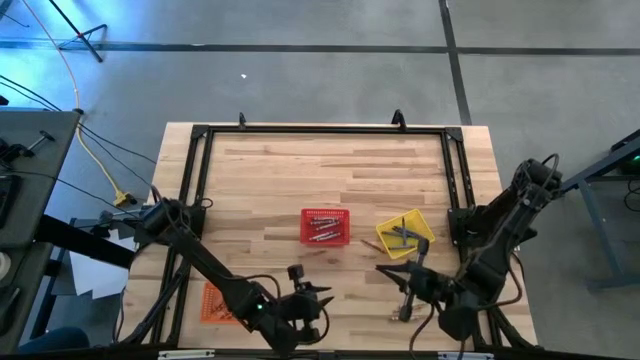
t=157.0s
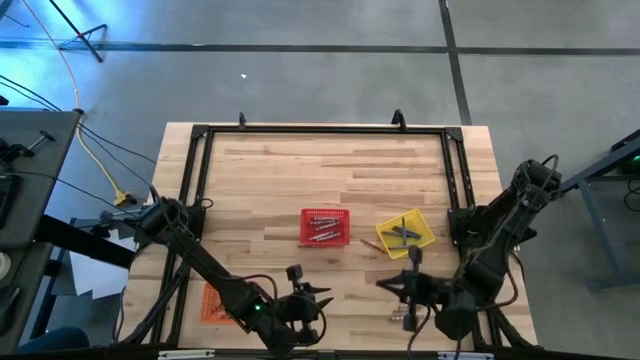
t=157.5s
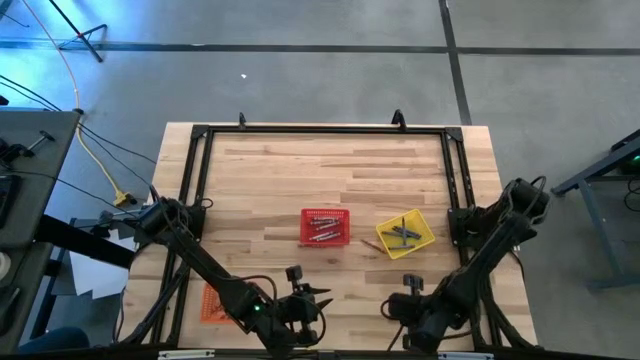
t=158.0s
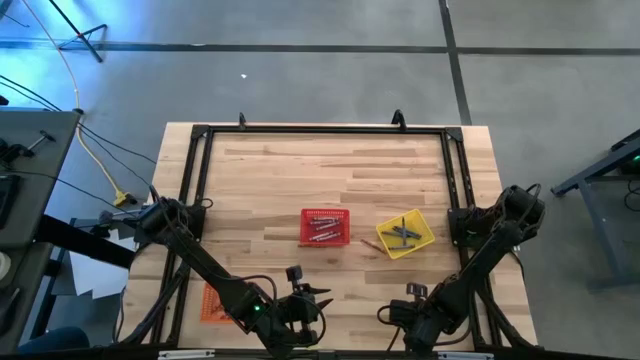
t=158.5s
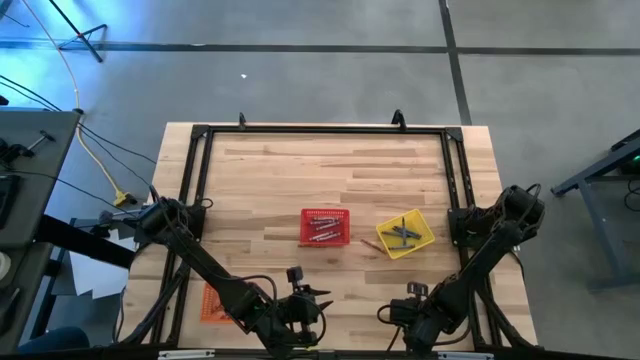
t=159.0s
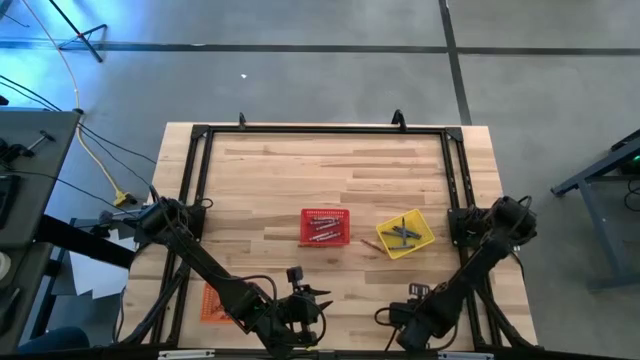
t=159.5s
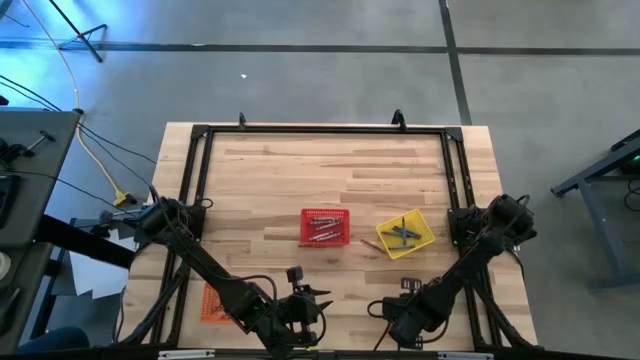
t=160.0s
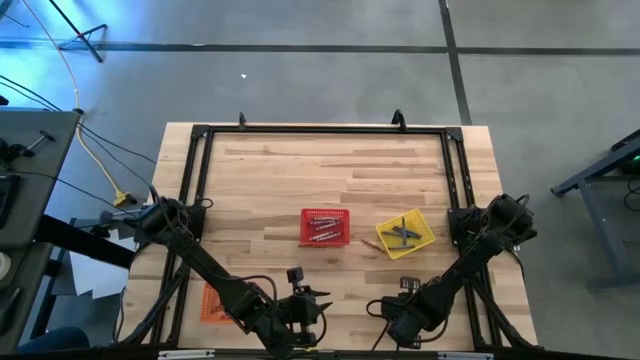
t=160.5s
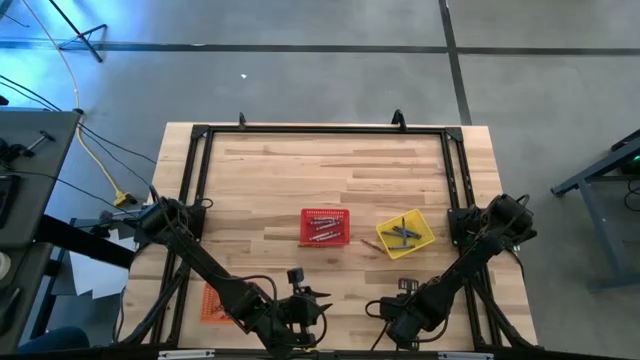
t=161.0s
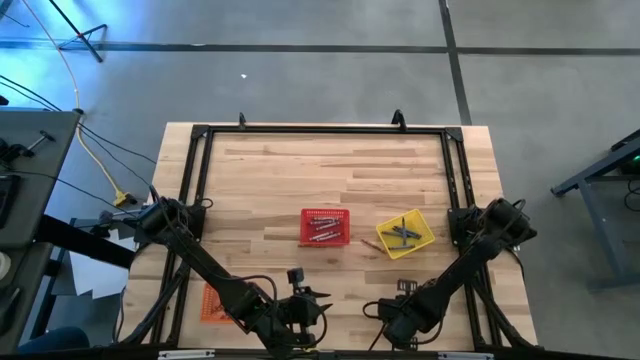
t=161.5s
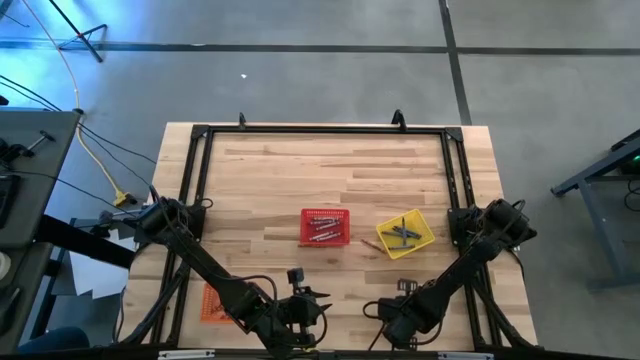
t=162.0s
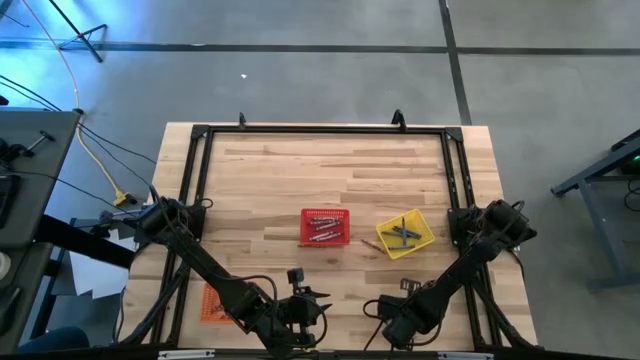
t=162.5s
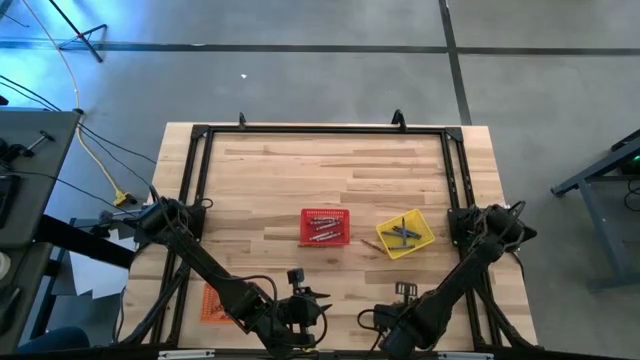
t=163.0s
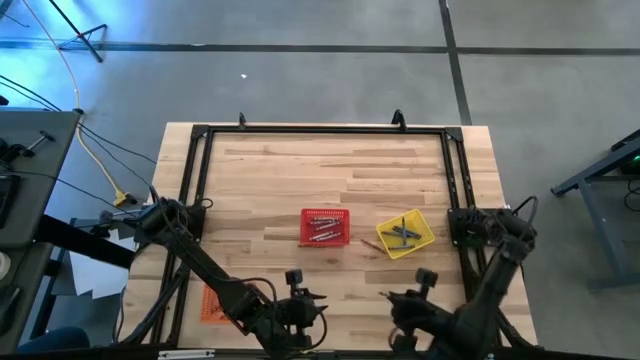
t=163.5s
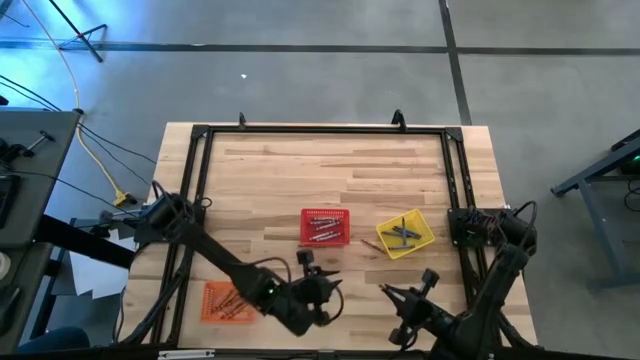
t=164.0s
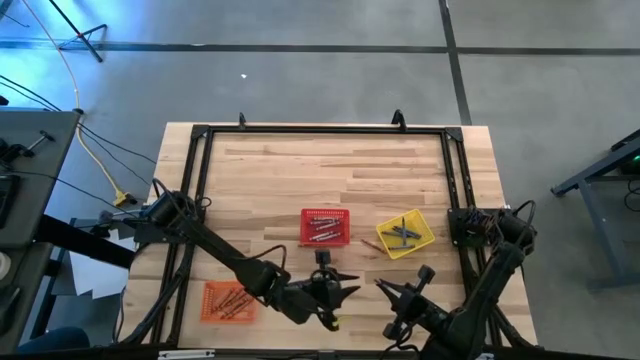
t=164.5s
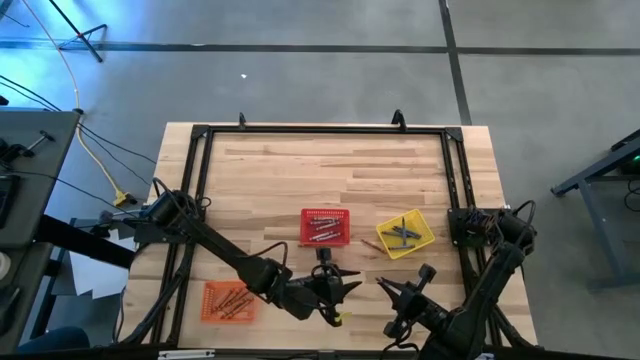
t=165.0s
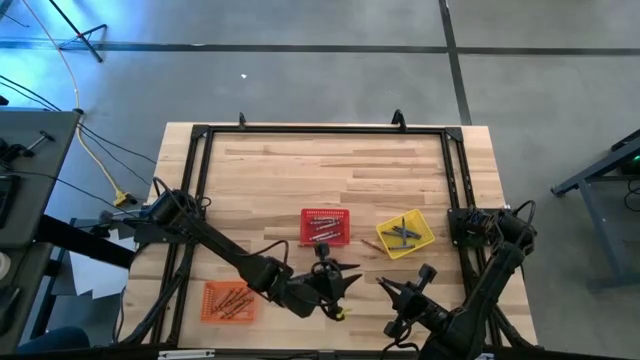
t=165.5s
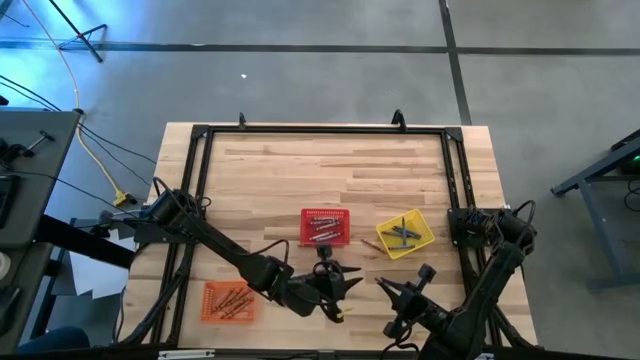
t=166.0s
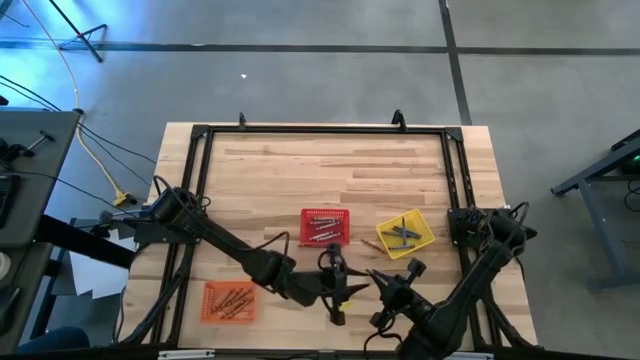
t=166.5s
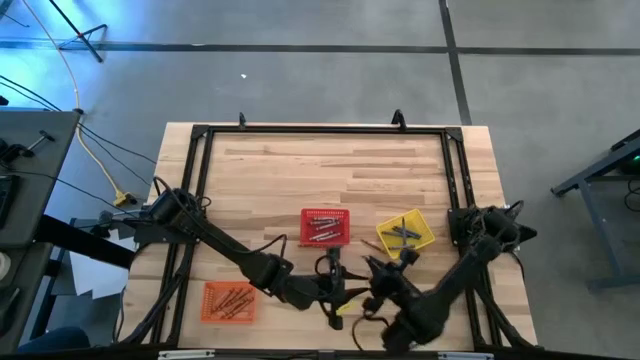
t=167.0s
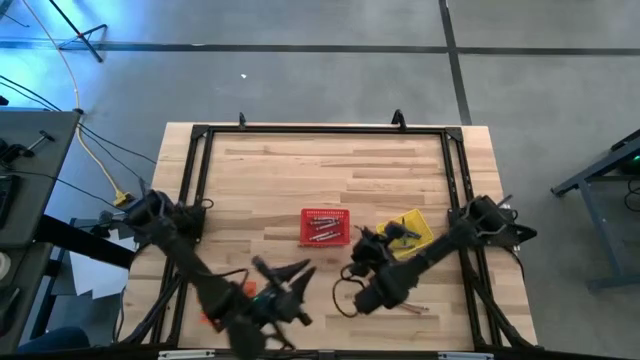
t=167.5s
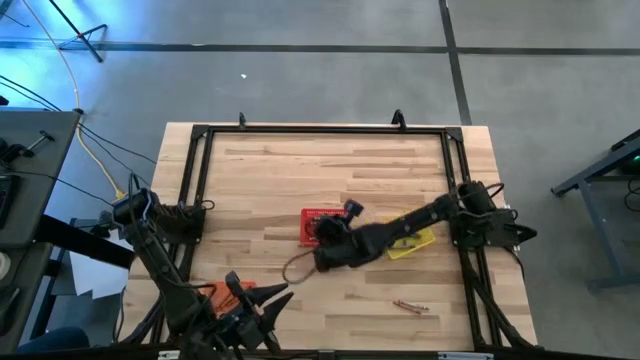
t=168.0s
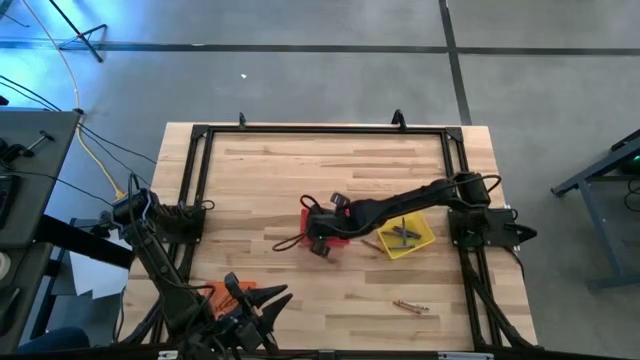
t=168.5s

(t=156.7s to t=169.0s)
Task: Sort crayons
Put the gray crayon into the red bin

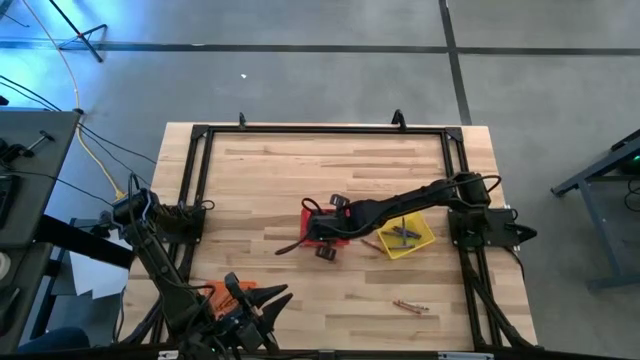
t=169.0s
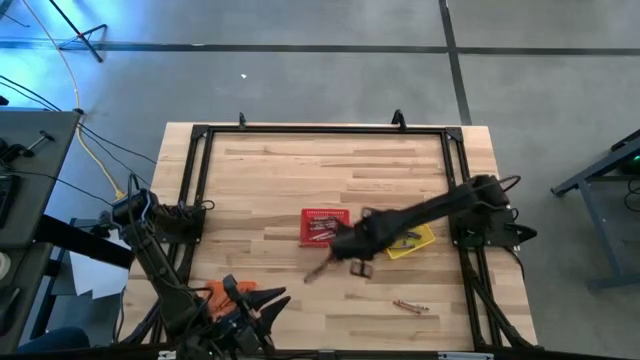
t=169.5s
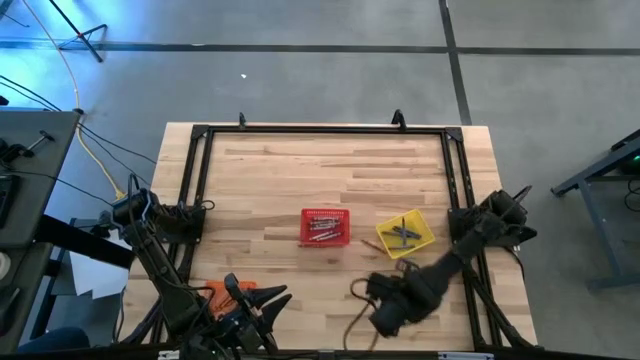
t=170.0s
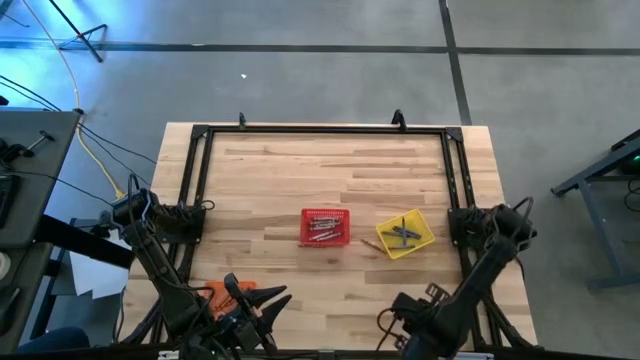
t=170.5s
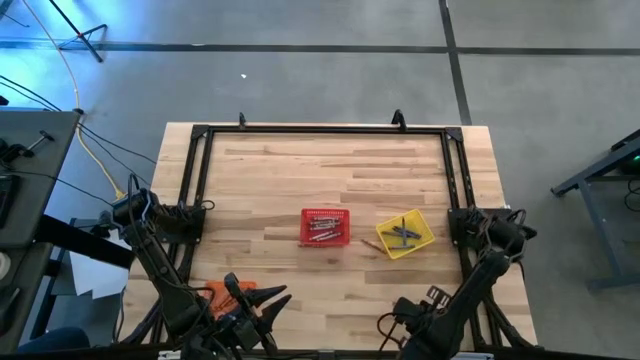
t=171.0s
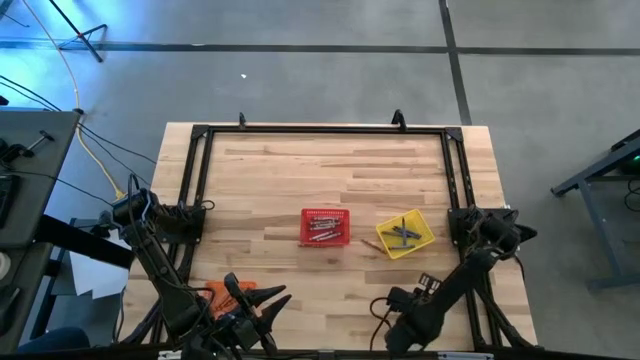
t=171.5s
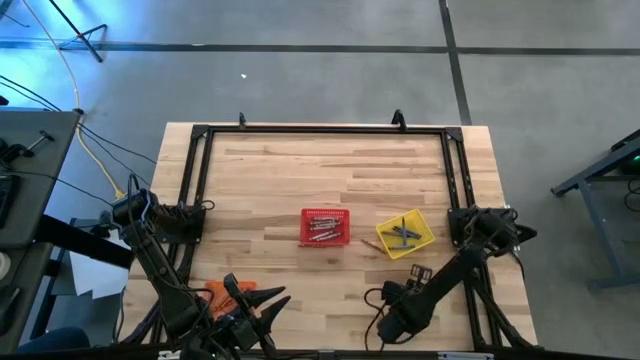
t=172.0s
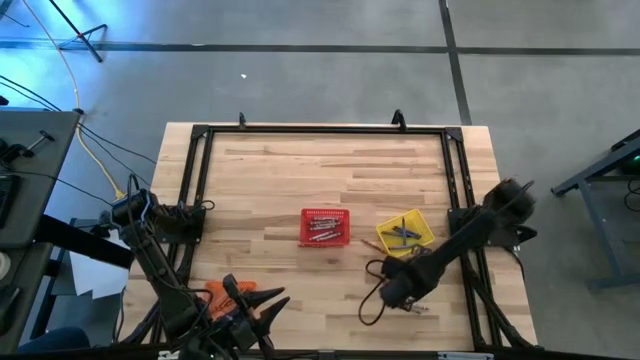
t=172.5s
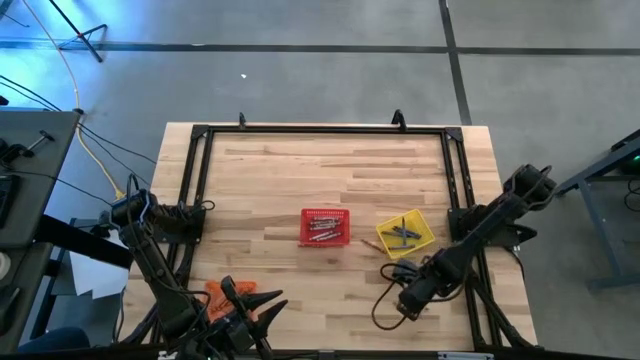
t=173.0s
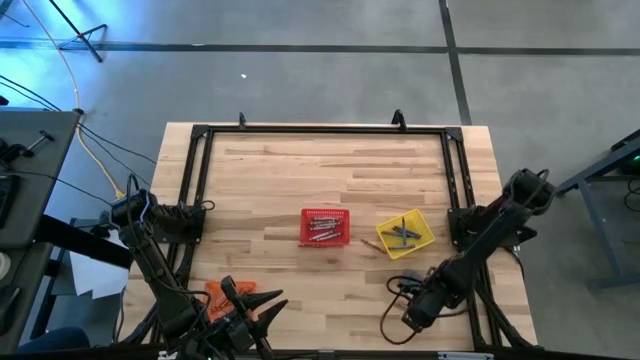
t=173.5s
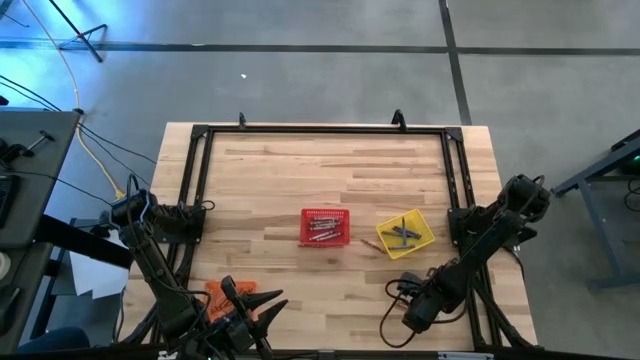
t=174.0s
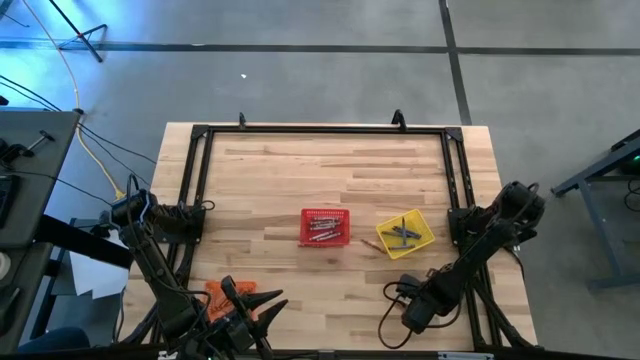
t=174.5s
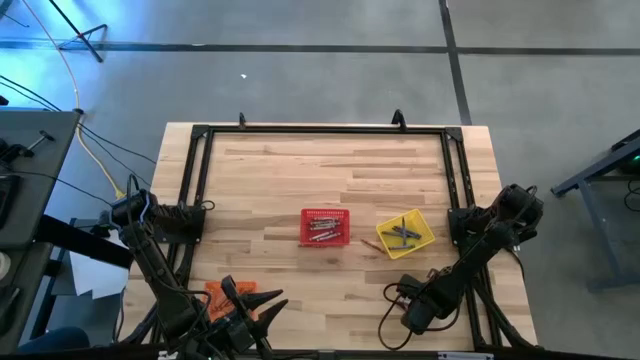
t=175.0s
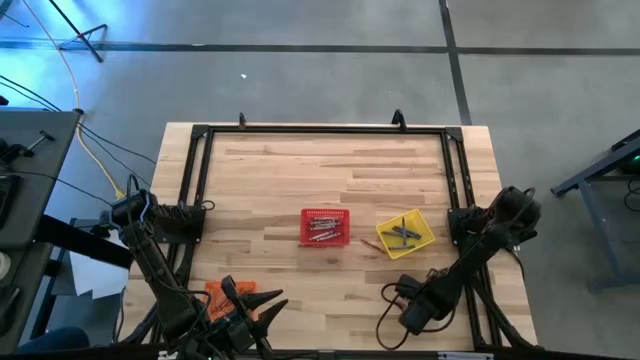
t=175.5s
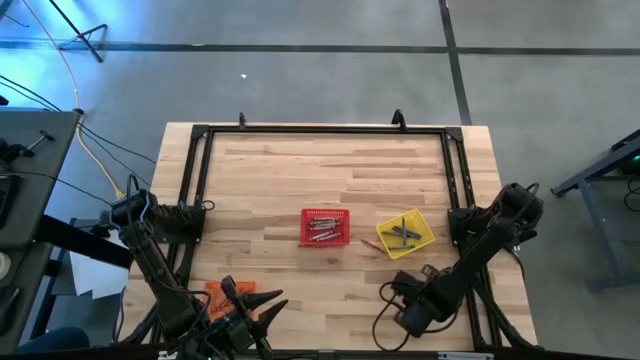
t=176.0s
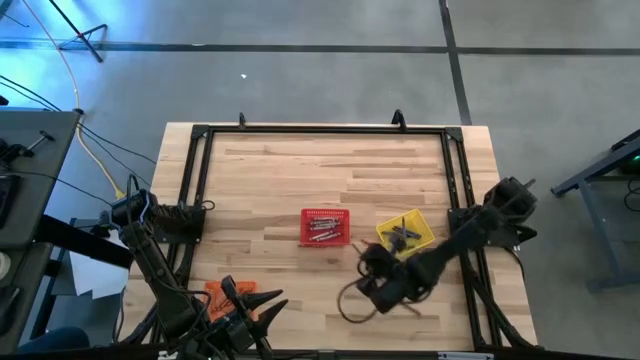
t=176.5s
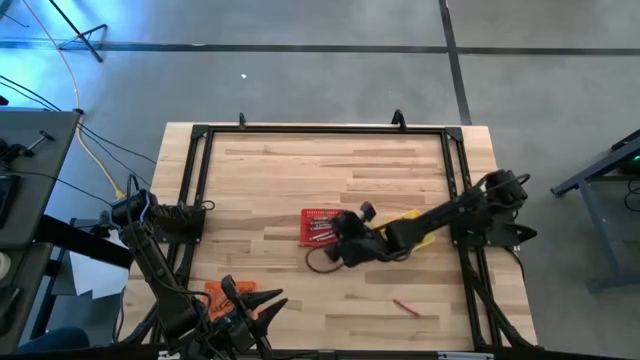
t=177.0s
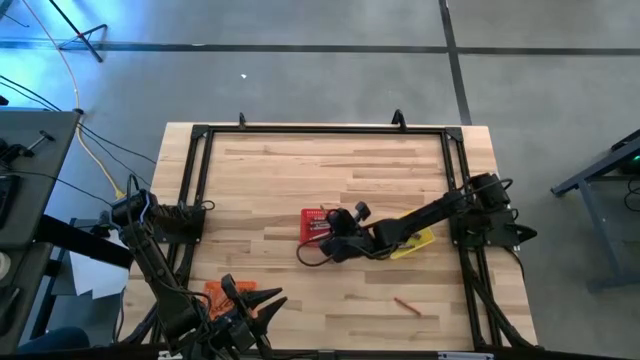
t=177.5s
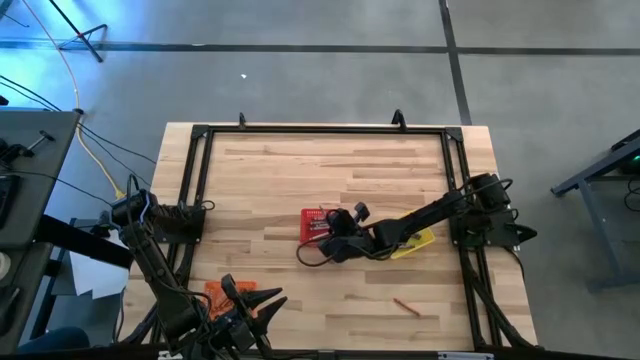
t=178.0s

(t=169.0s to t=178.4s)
Put the gray crayon into the red bin
